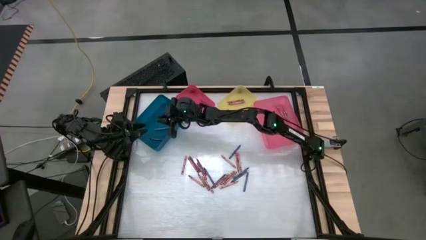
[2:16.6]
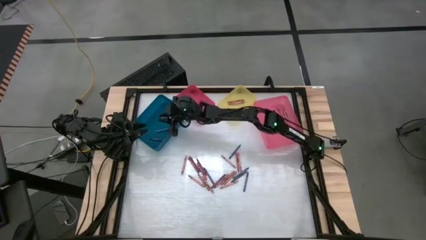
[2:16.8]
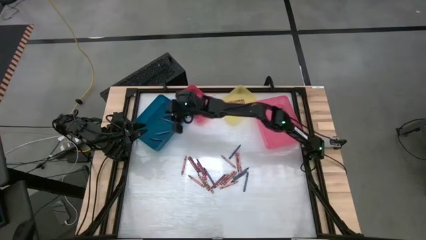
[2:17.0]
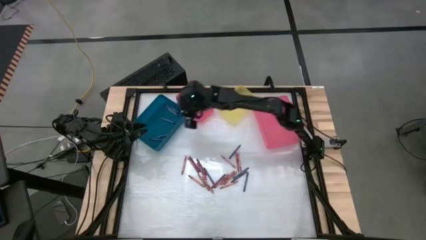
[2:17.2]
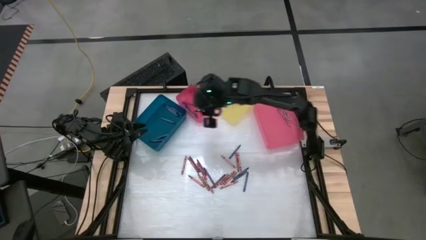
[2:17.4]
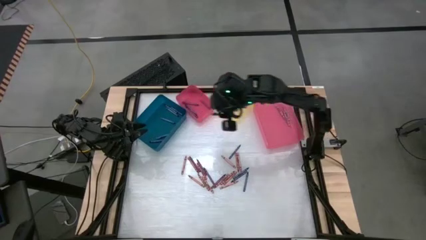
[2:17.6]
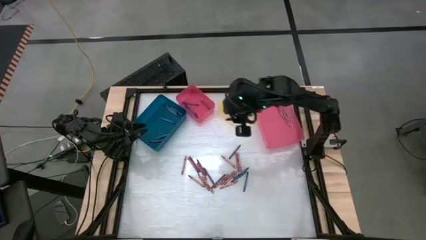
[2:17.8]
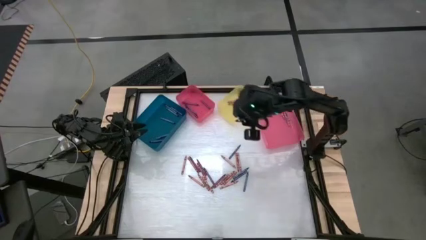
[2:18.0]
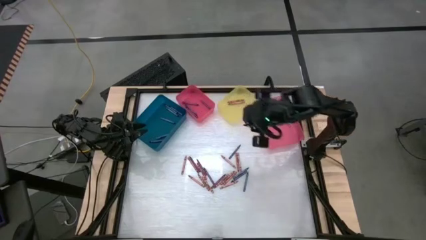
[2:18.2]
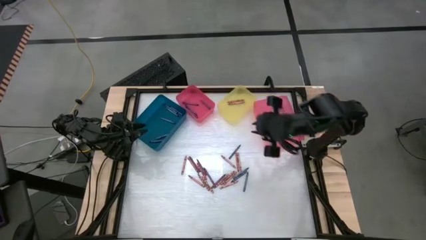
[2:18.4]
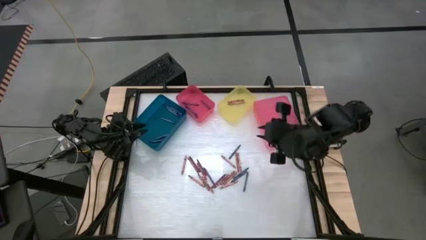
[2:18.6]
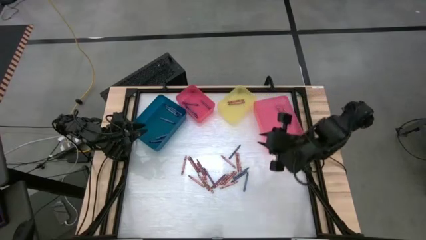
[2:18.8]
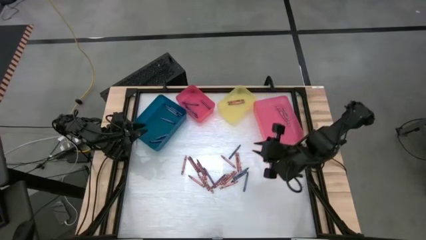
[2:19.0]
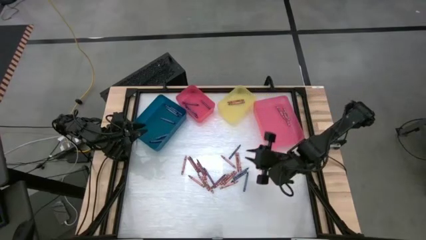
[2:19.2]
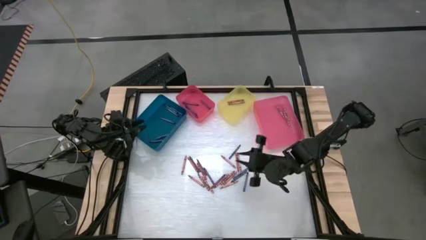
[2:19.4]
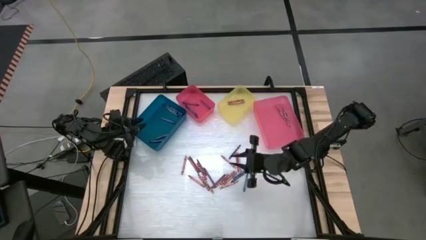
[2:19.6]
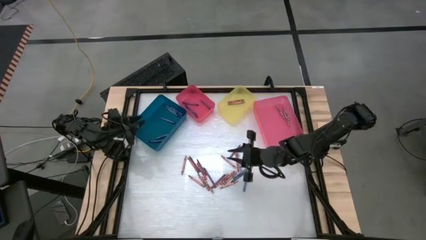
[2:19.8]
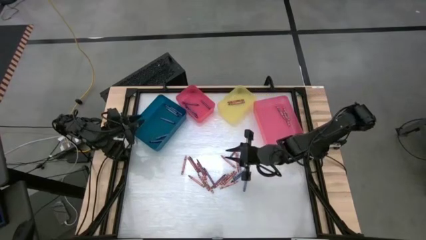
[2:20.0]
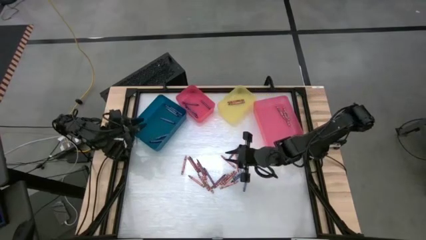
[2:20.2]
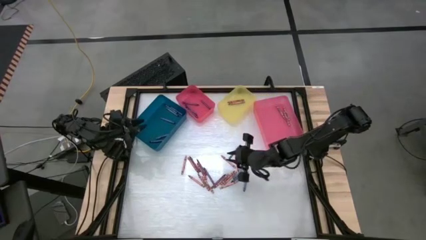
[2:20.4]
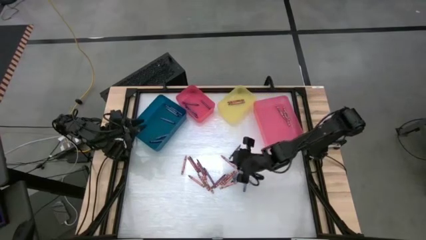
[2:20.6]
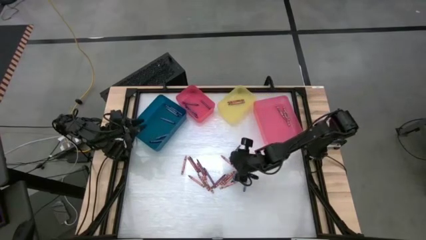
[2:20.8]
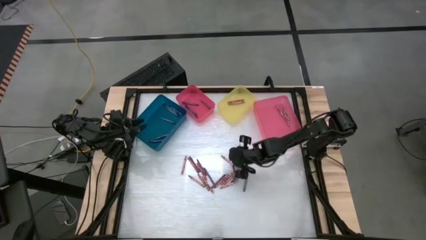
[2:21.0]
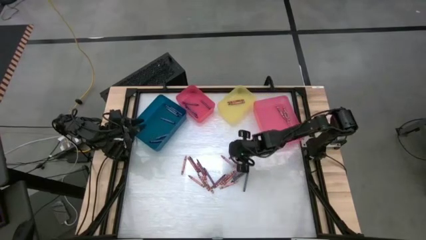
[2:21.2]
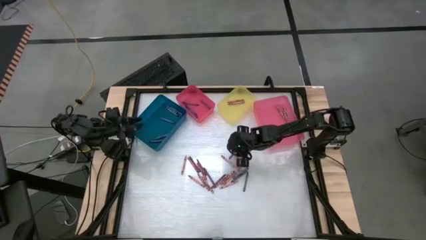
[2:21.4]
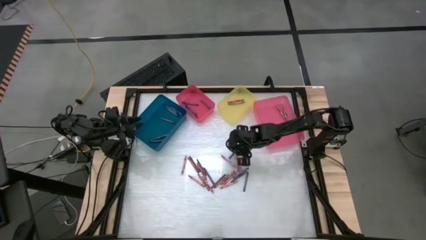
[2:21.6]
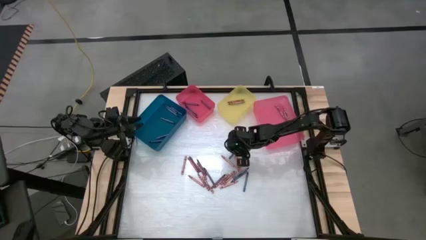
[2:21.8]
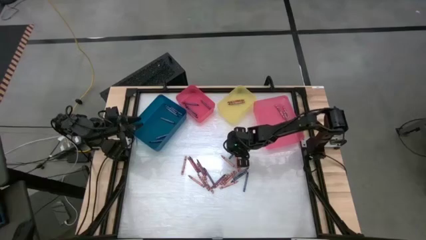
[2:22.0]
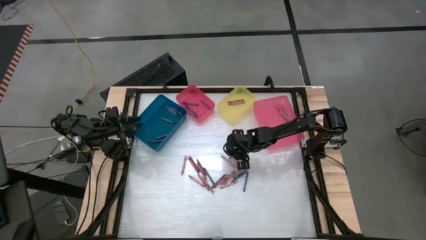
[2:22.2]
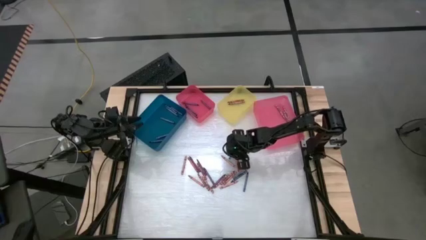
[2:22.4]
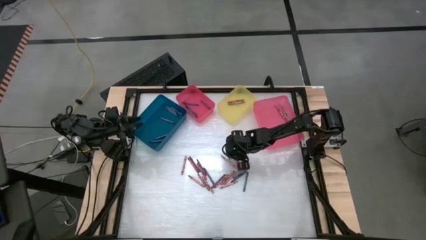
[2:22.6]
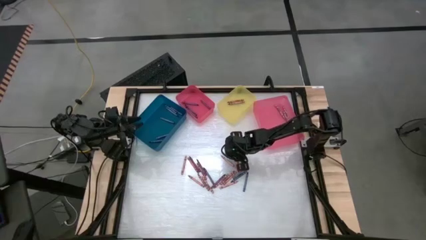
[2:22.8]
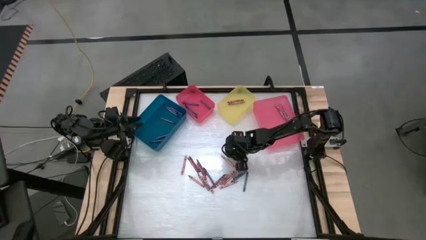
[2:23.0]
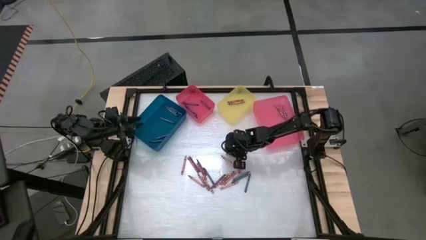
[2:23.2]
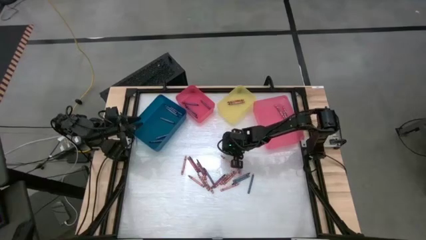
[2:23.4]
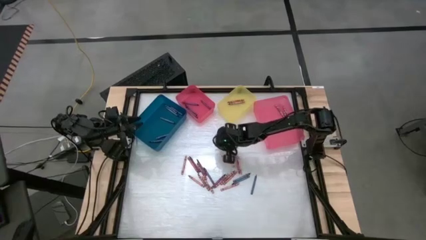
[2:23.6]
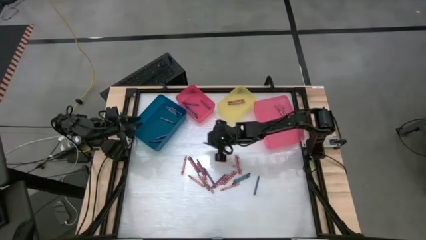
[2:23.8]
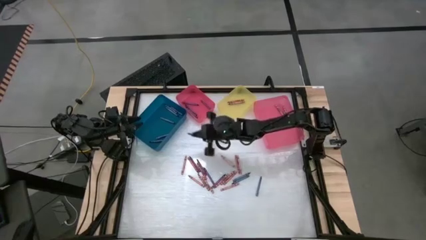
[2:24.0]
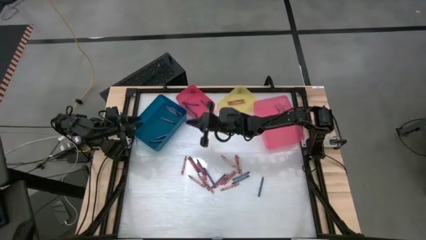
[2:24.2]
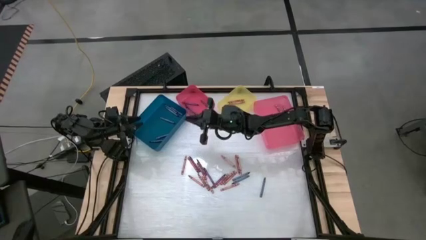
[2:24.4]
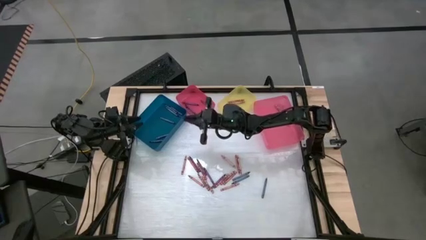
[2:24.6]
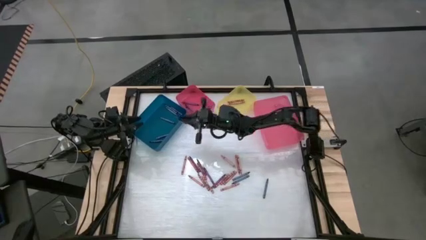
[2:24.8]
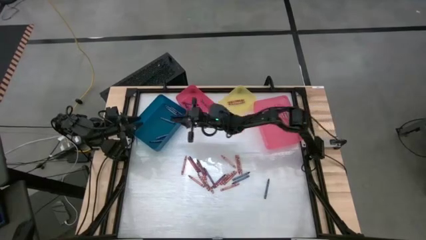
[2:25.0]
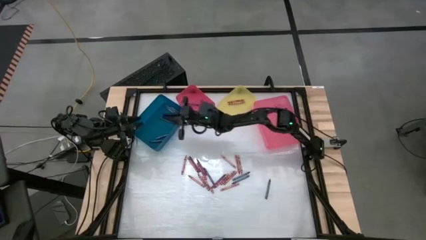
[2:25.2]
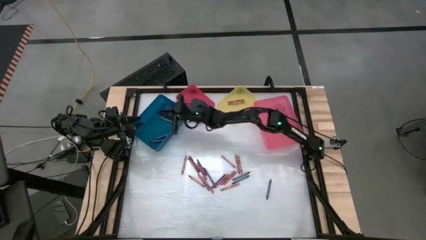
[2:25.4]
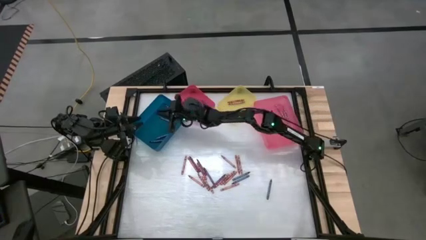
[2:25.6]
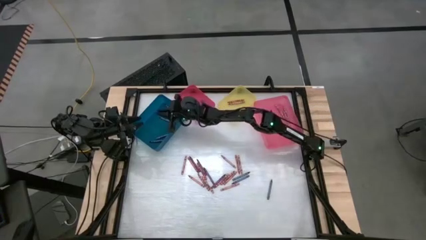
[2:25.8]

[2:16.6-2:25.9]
Task: Sort crayons
Put the blue crayon into the blue bin

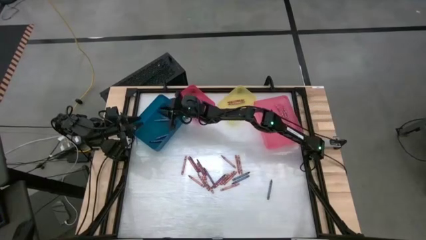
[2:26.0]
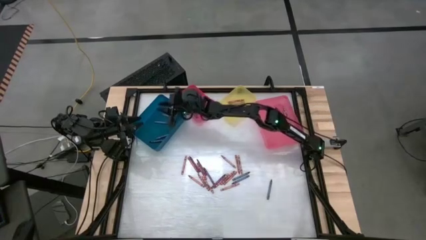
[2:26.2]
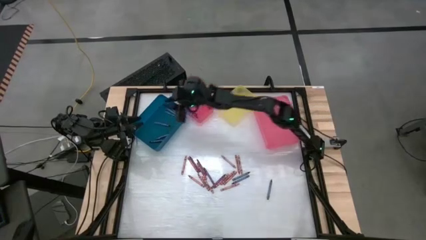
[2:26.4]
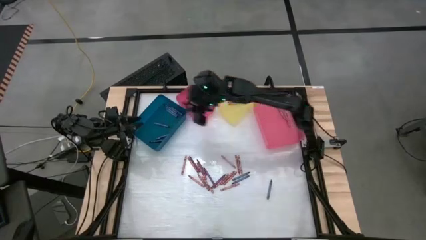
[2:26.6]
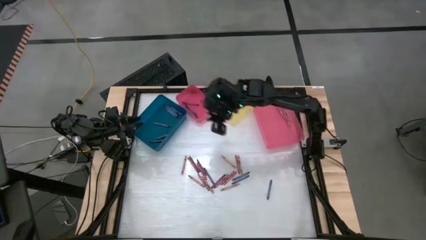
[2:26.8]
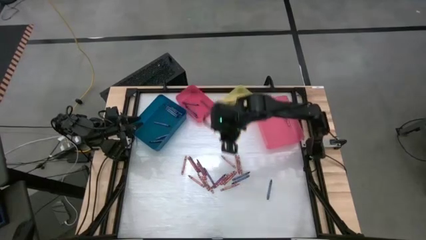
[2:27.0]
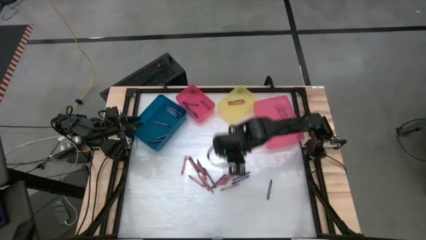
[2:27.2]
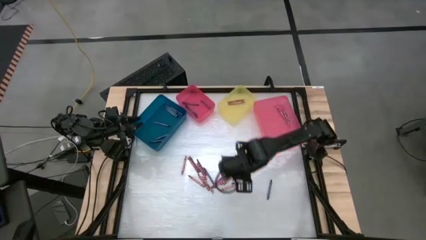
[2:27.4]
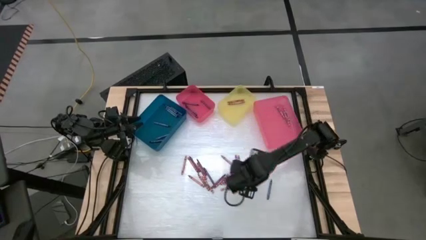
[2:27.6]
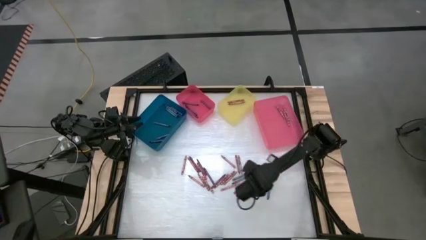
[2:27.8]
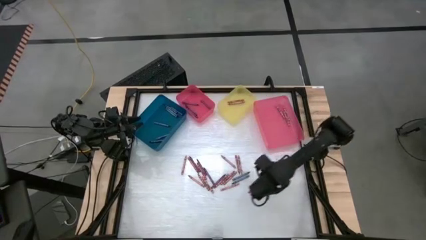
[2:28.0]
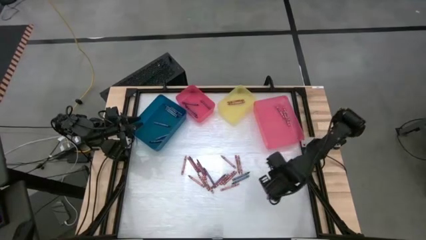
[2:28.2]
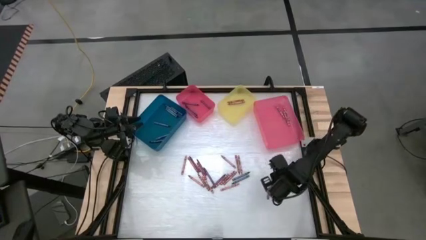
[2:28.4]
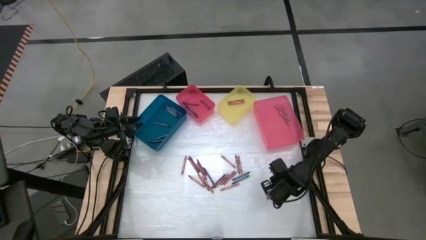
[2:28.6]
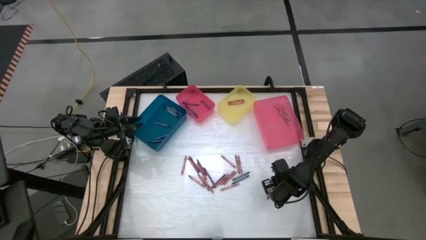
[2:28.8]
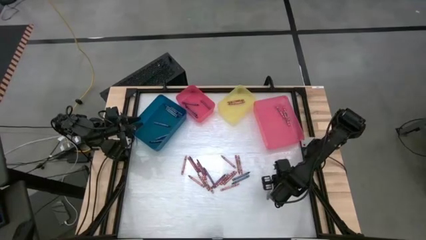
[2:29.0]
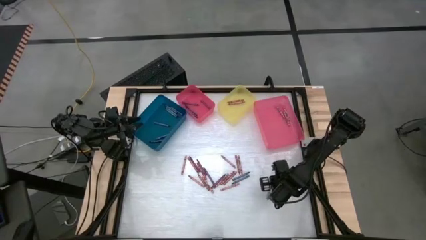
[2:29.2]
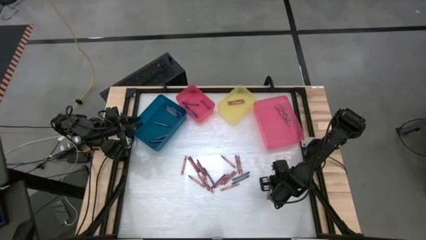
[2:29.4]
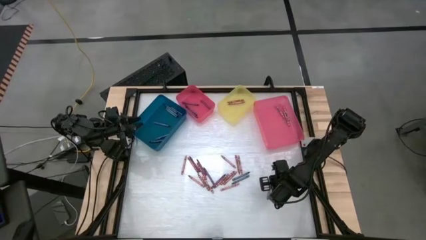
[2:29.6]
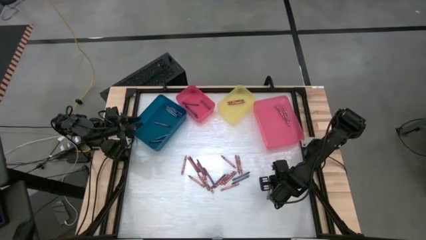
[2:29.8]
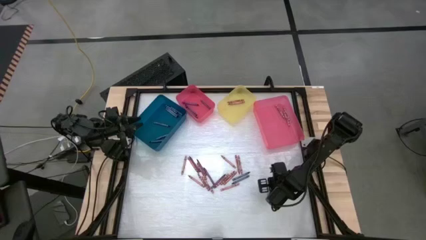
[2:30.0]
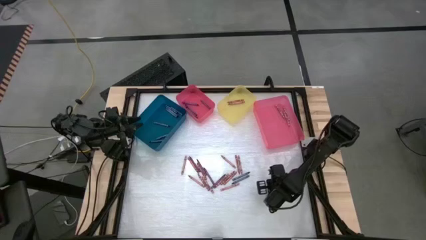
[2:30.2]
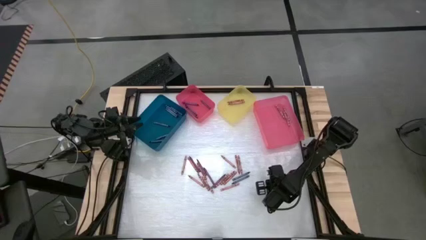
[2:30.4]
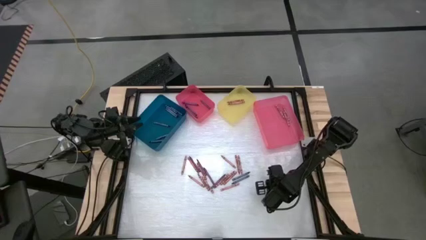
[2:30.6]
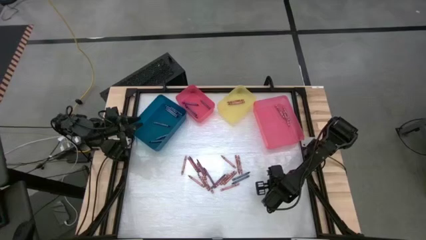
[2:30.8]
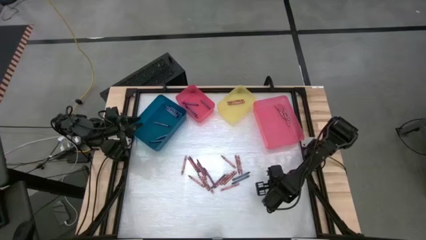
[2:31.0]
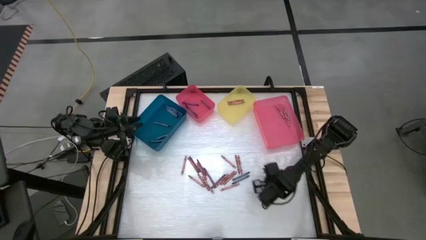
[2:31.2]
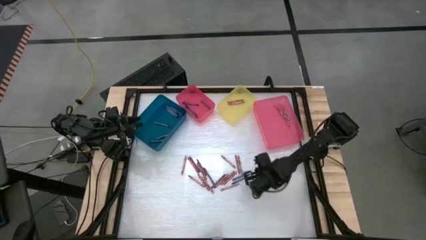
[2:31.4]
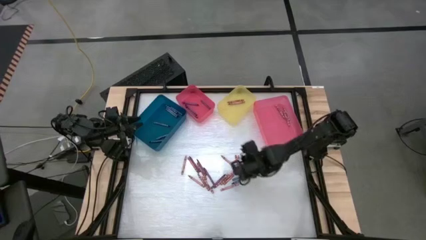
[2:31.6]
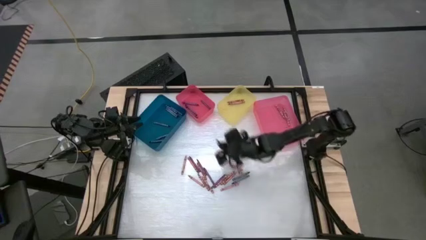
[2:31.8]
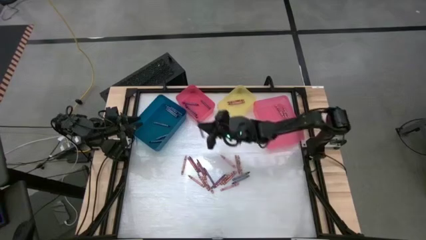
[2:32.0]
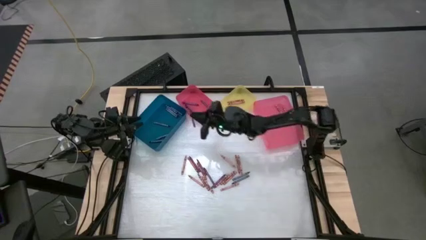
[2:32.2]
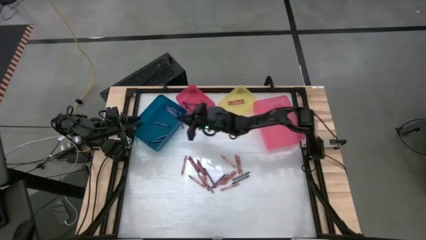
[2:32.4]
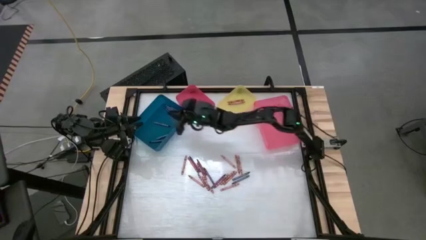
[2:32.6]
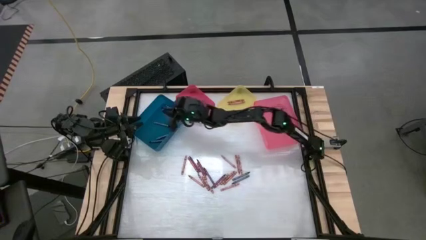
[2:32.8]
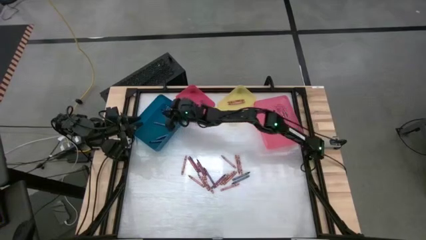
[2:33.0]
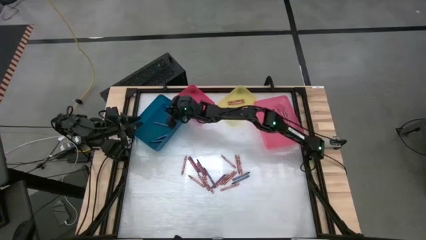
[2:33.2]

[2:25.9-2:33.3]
Put the blue crayon into the blue bin
